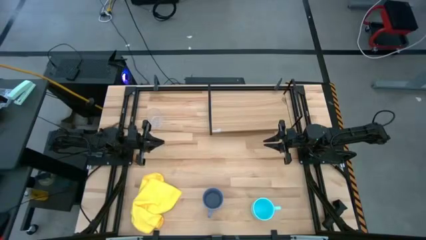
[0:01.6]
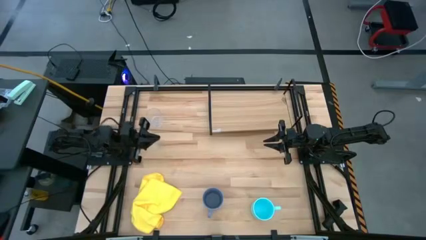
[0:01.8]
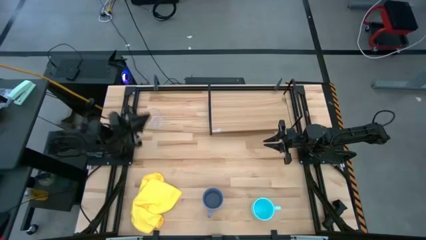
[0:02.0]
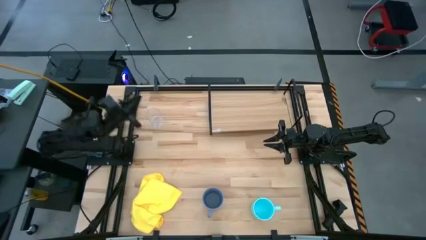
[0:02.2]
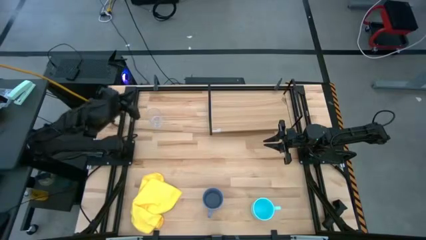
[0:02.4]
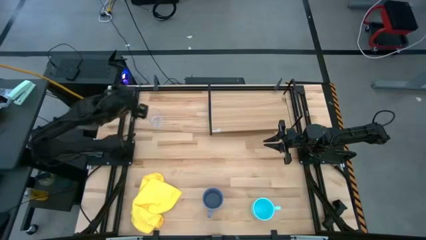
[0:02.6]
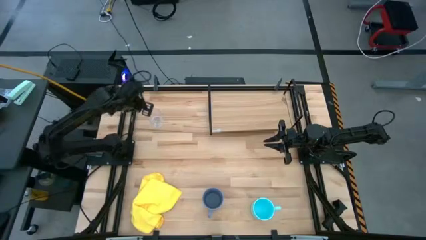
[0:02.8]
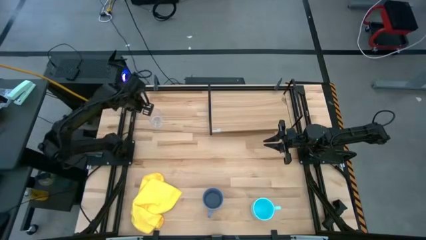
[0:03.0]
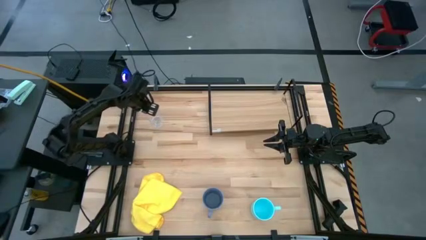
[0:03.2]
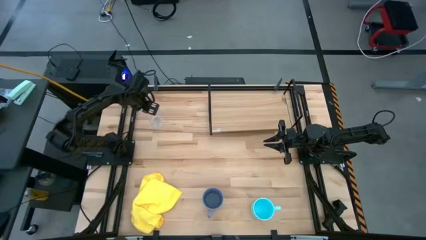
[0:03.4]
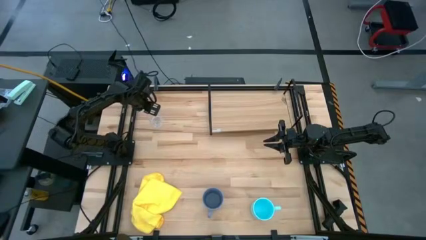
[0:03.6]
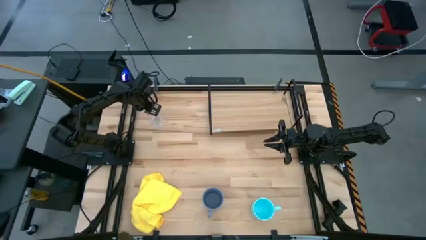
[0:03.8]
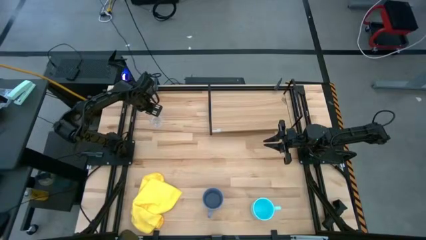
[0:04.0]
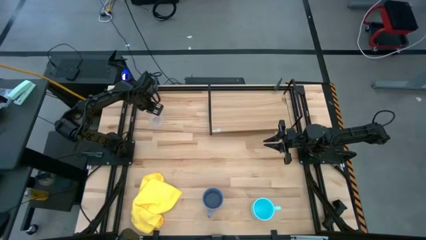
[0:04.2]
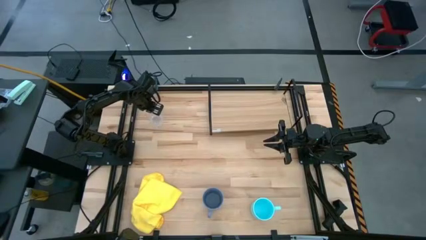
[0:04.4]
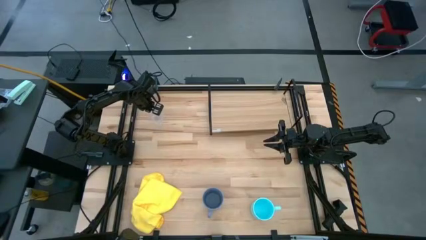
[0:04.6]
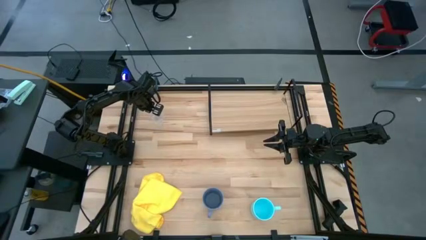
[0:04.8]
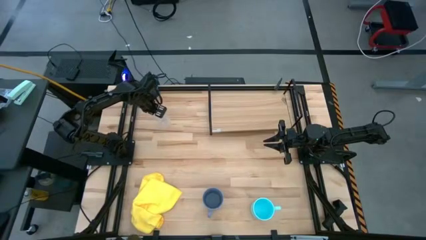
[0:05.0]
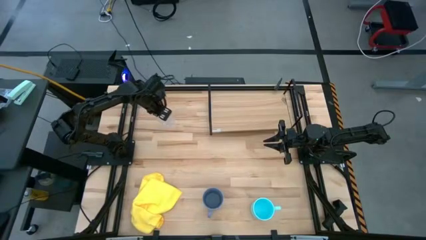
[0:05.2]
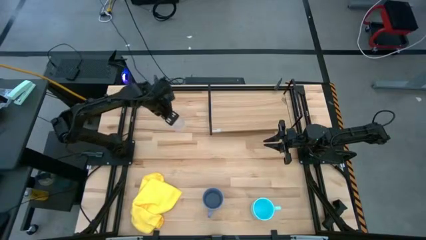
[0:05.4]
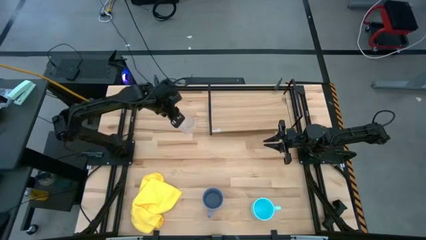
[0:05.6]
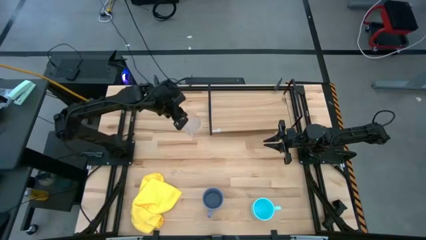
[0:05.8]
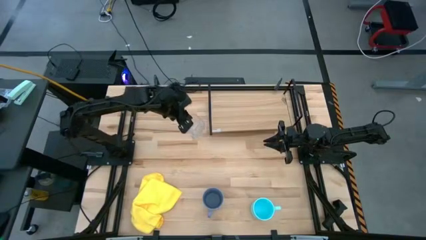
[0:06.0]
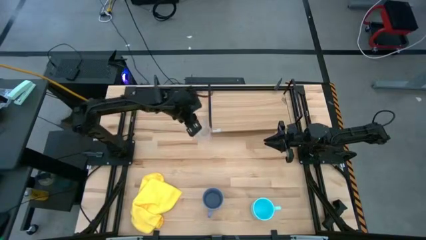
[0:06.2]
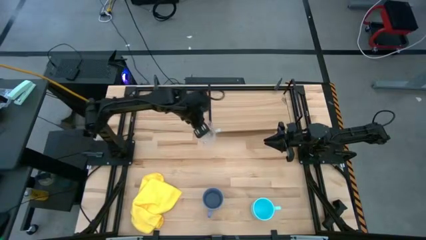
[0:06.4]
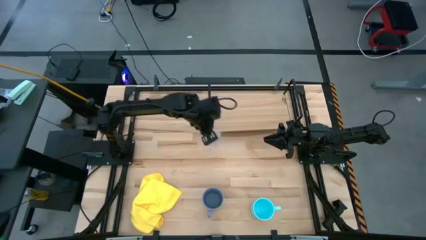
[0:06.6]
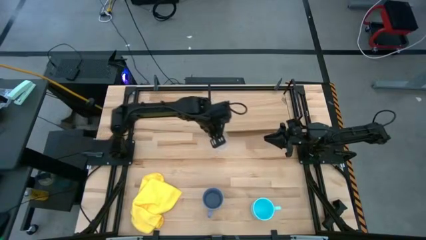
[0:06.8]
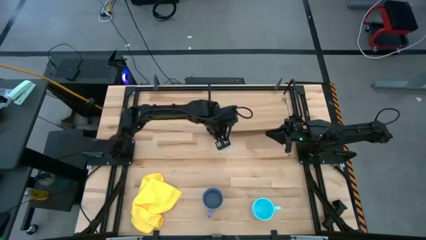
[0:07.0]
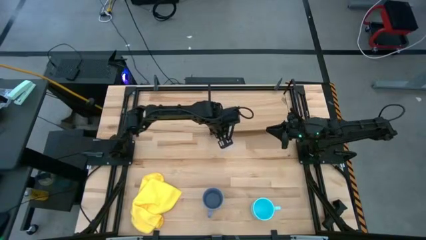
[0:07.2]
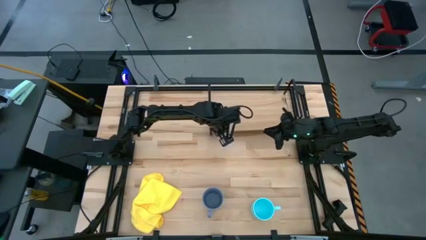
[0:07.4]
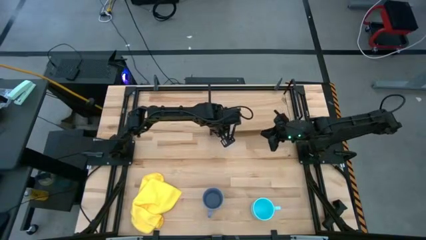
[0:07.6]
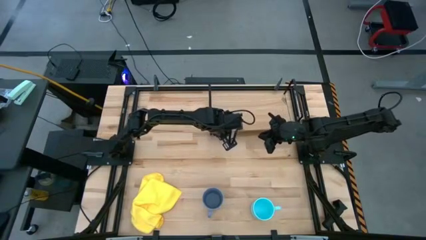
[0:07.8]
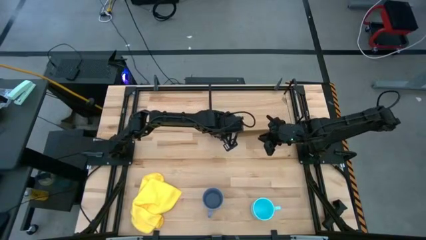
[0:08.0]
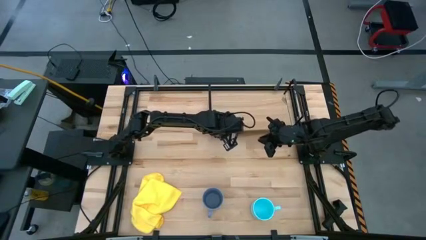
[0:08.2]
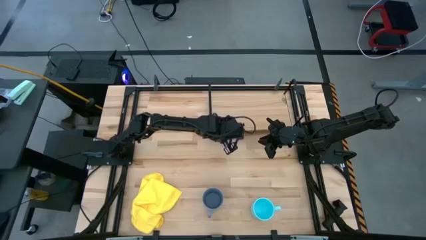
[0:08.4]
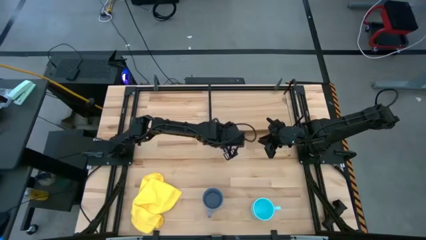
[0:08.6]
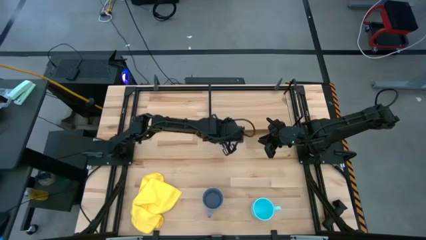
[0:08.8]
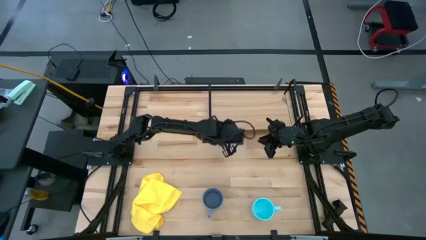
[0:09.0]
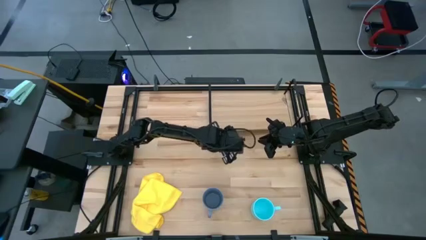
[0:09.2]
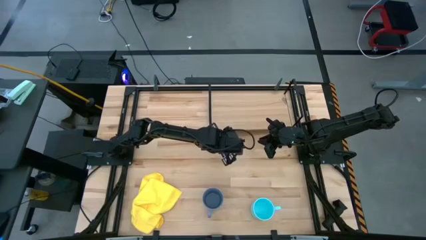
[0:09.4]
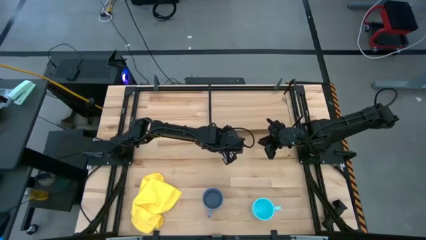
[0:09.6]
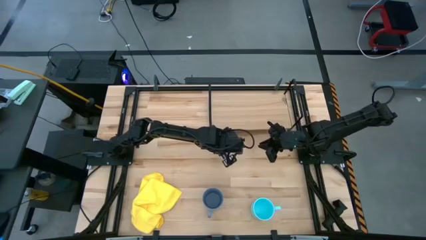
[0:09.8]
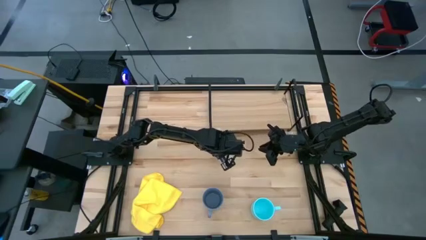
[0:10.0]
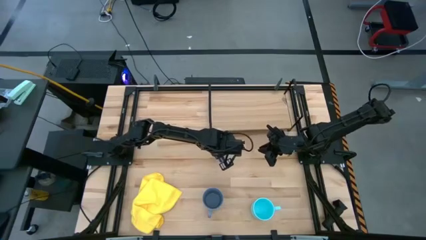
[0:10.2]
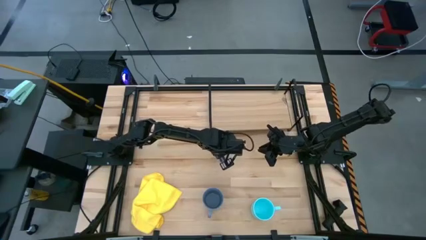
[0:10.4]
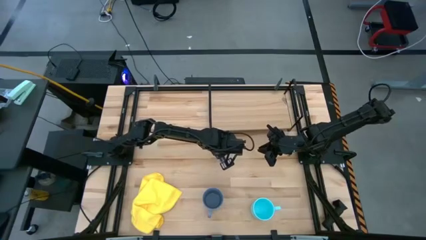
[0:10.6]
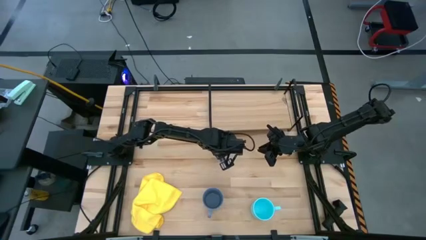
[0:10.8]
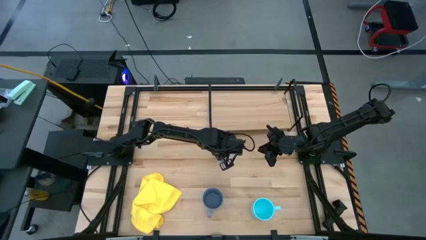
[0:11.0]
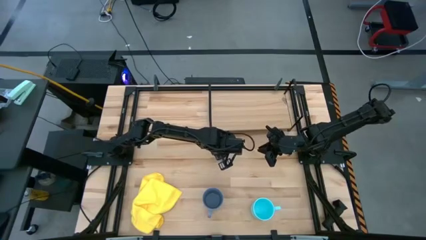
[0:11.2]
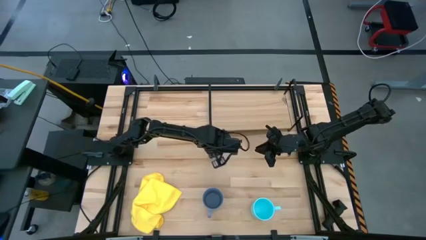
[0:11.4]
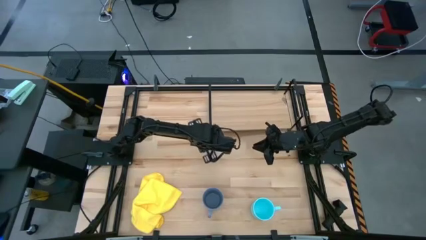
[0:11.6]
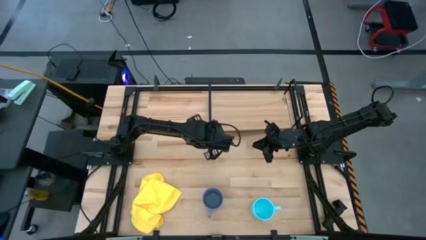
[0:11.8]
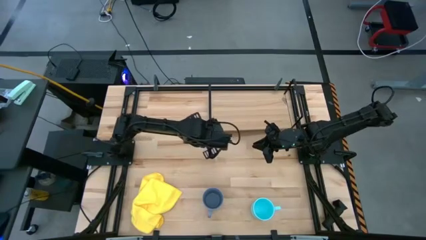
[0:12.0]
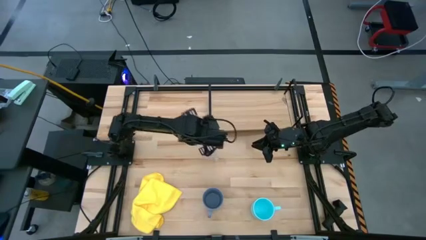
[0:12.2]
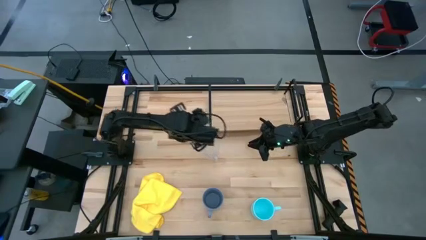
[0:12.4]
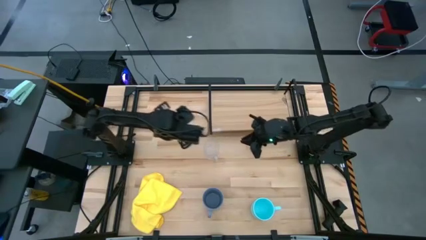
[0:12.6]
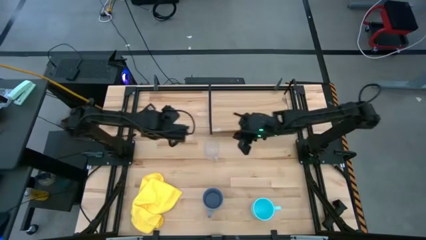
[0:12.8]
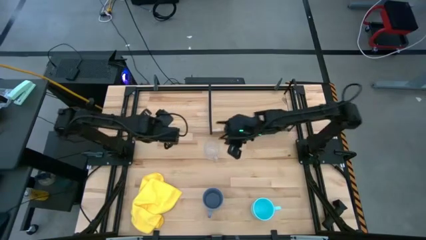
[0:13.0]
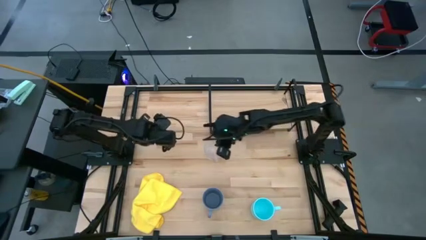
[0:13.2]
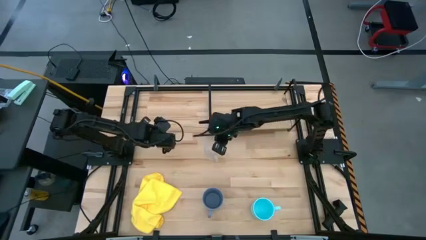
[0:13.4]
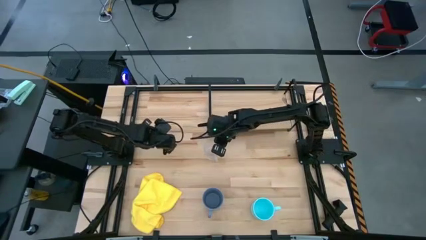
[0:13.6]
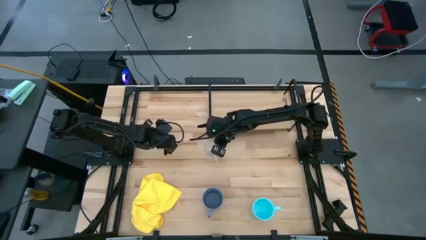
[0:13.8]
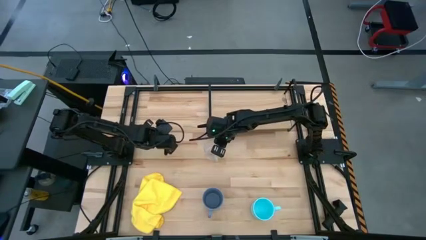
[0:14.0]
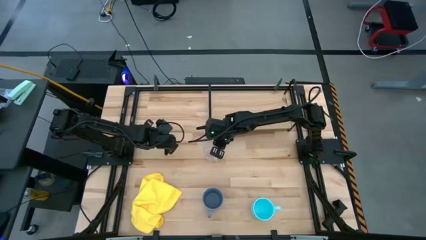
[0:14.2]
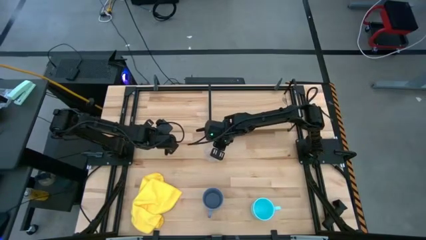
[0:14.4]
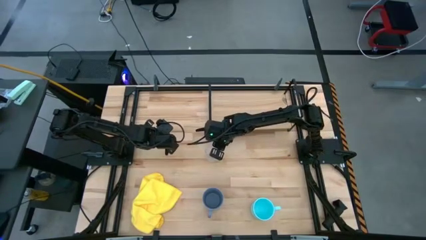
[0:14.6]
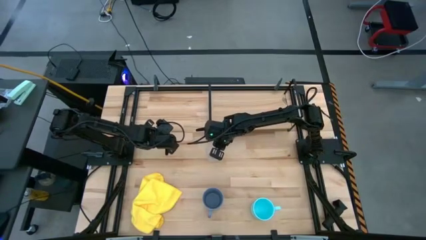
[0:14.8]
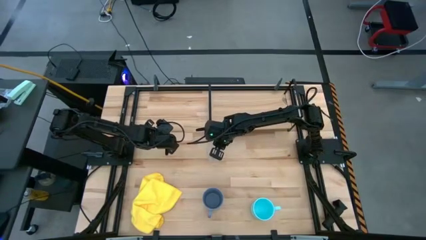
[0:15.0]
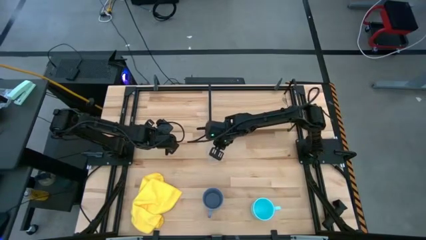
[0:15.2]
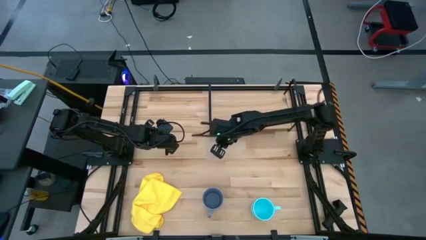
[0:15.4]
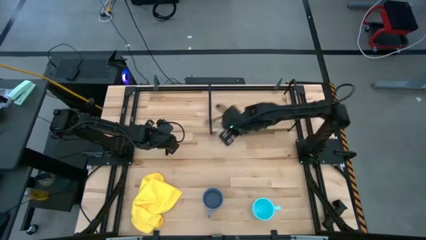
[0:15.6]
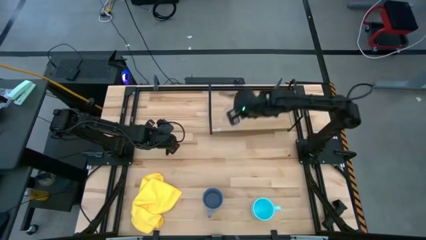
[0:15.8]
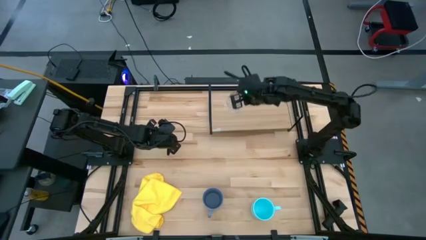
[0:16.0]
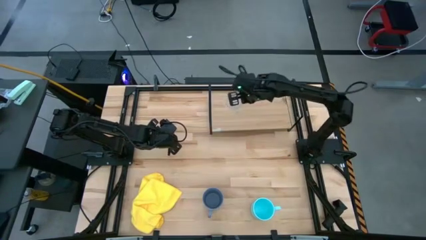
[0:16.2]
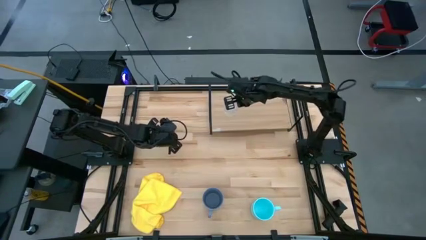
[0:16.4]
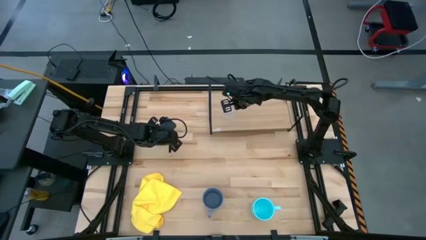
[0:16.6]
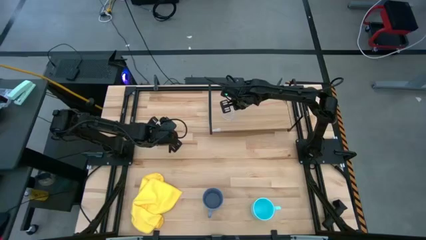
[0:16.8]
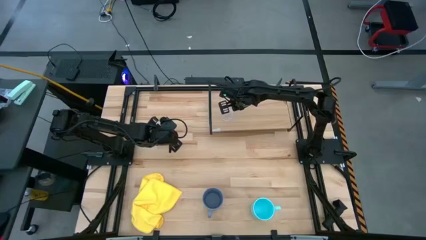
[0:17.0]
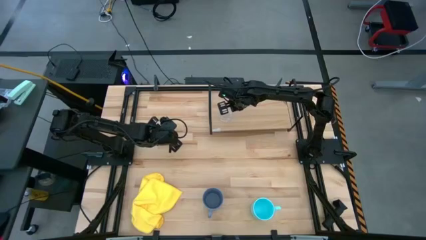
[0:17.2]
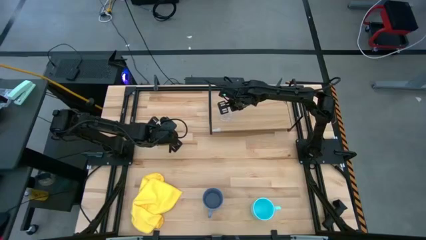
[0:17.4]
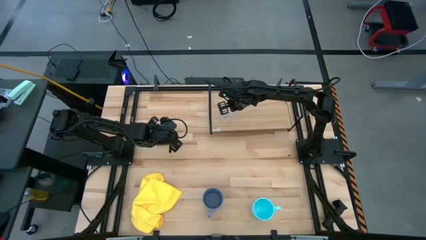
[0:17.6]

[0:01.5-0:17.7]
Task: Stack small to large cups/mugs on shelf
Put the transparent mug on the shelf
